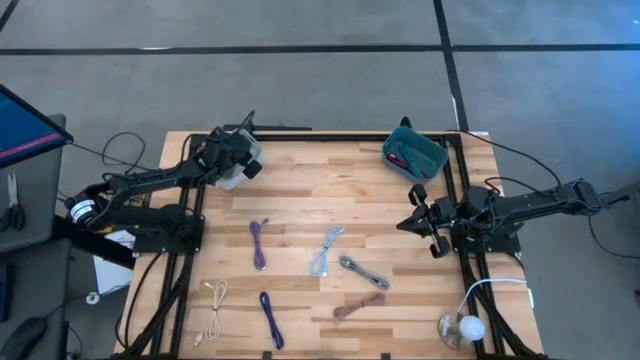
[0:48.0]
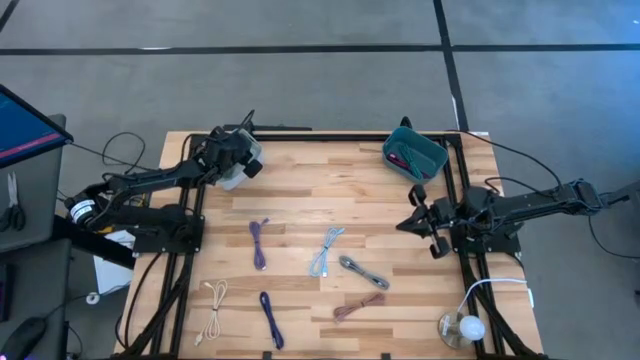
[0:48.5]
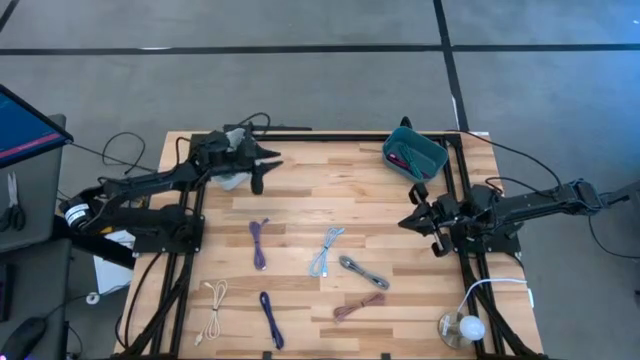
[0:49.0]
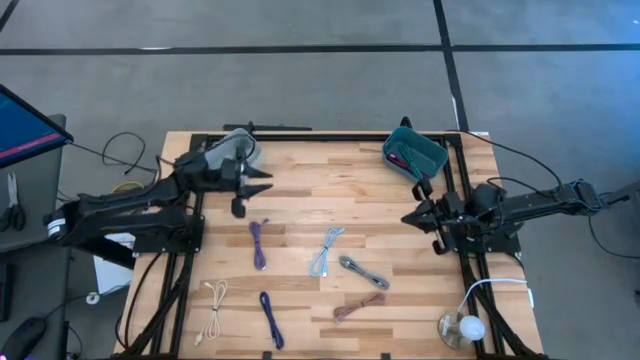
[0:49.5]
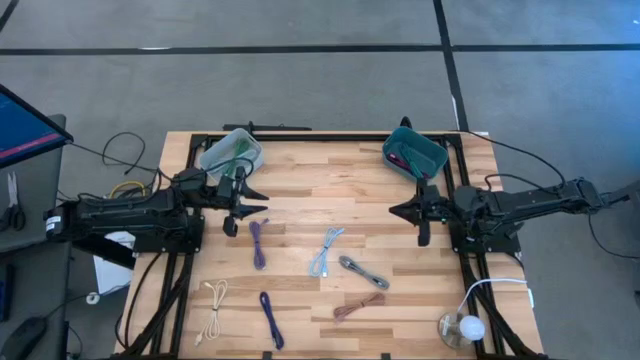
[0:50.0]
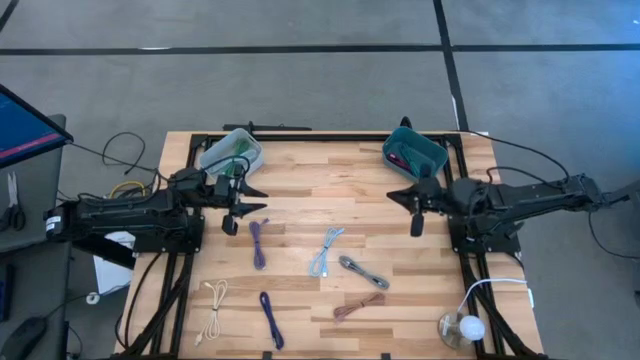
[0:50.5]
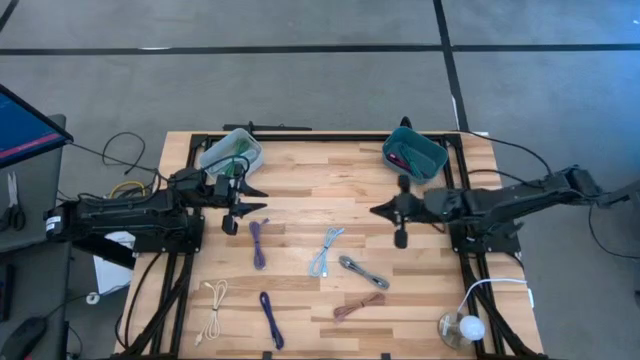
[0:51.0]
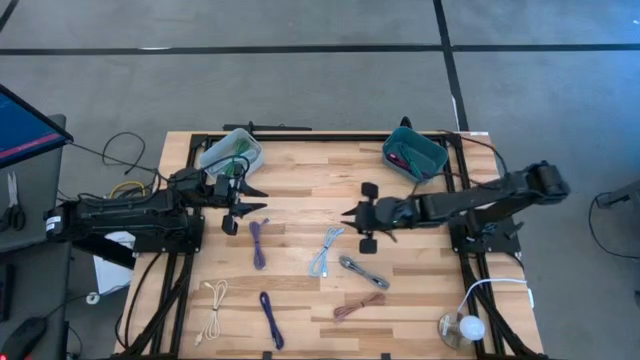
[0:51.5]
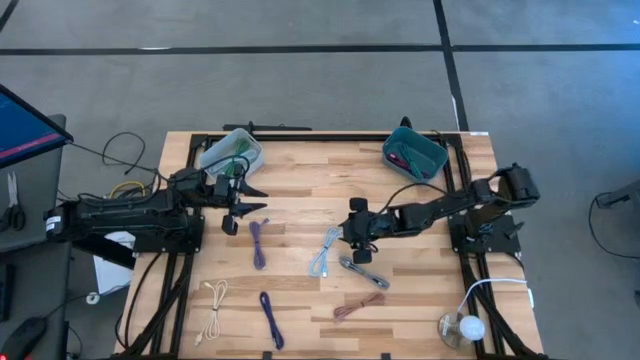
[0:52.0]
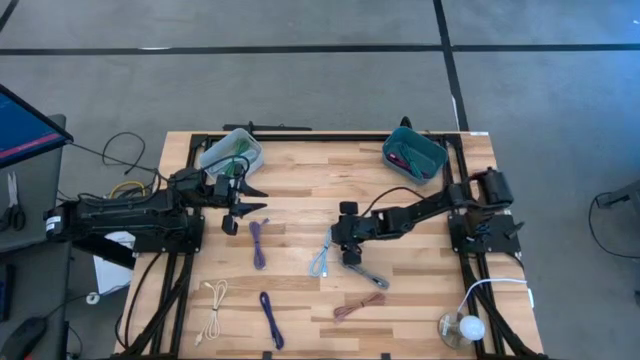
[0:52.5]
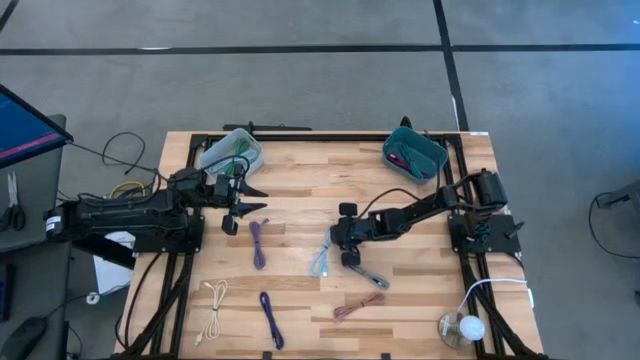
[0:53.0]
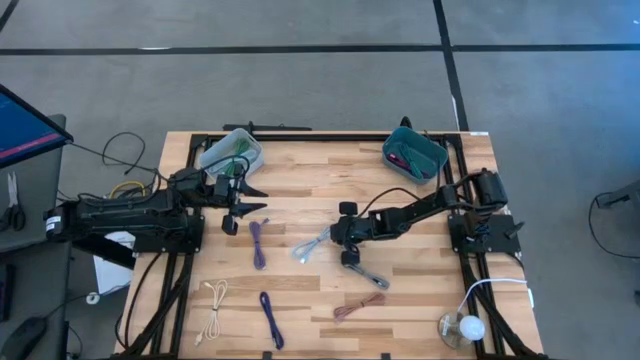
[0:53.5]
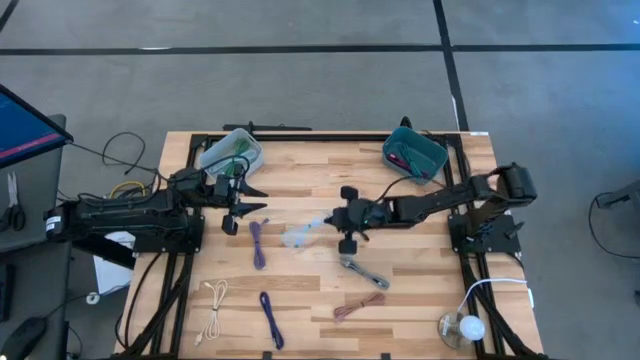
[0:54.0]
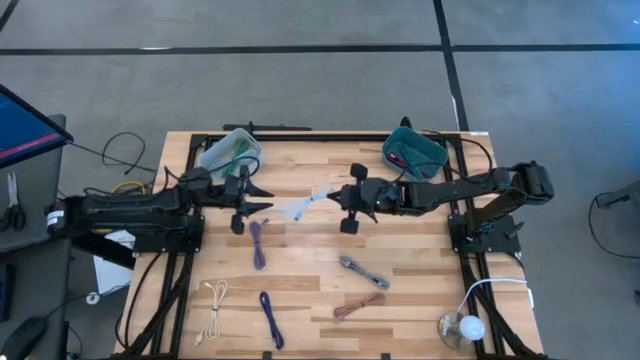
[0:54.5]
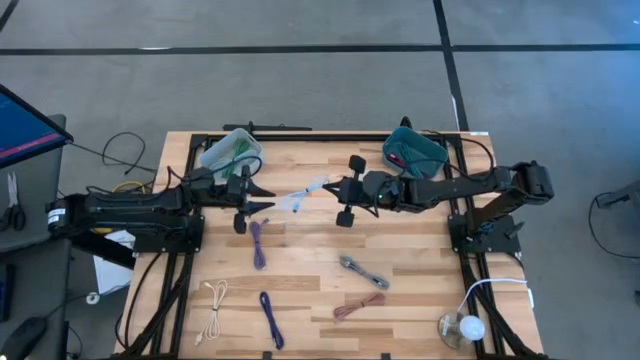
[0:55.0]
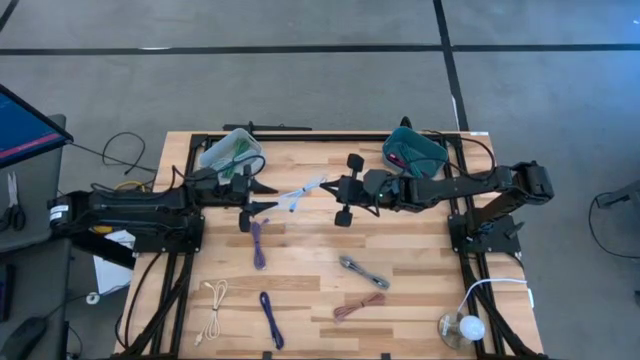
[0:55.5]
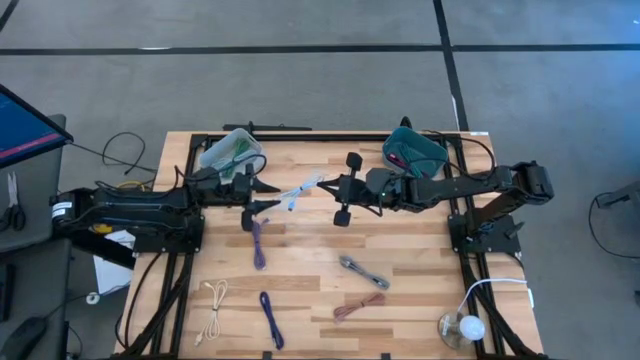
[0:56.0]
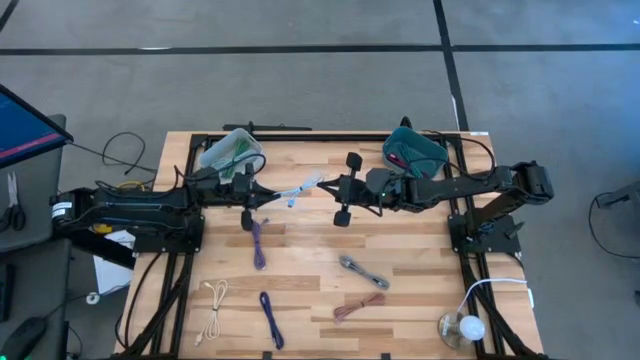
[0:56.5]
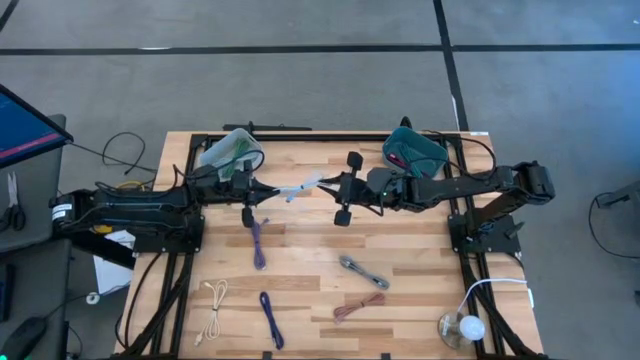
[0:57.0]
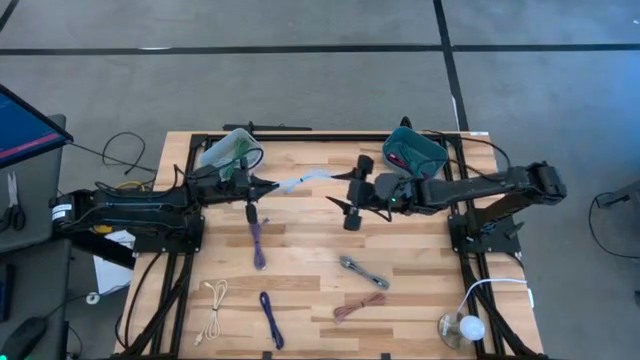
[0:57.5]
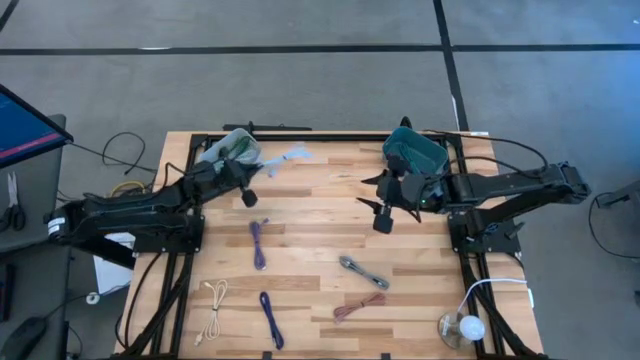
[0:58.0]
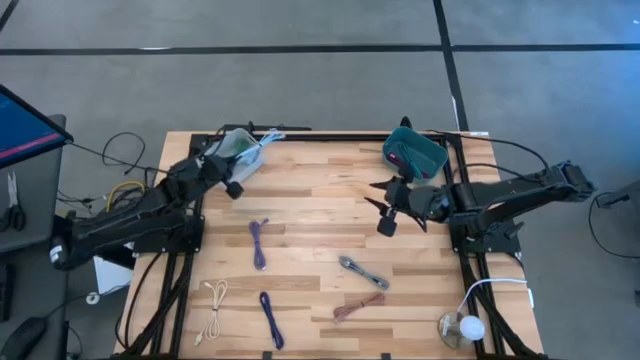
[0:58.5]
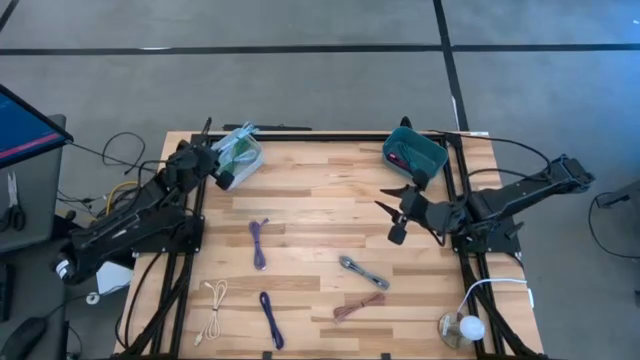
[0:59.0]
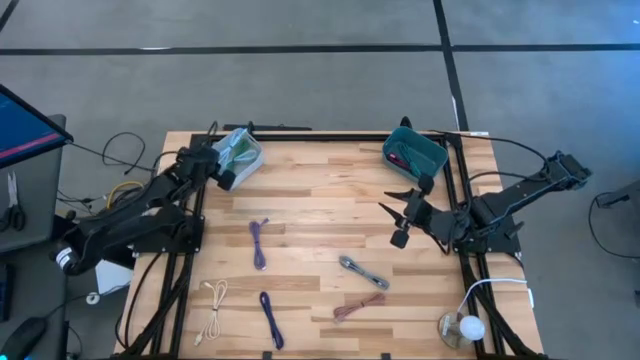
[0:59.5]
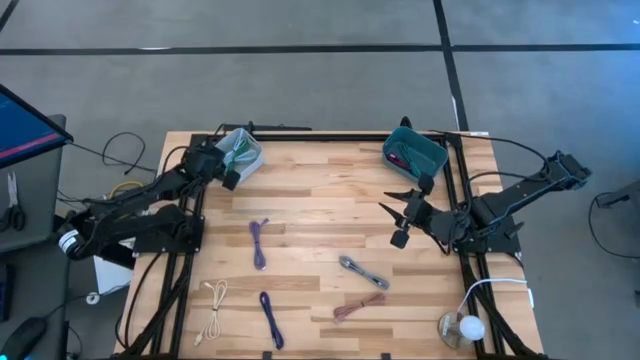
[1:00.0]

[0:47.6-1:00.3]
Task: Pick & Place USB Port
Put the blue charger cable into the white bin

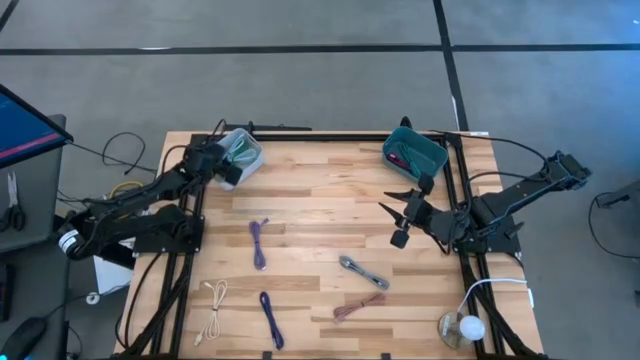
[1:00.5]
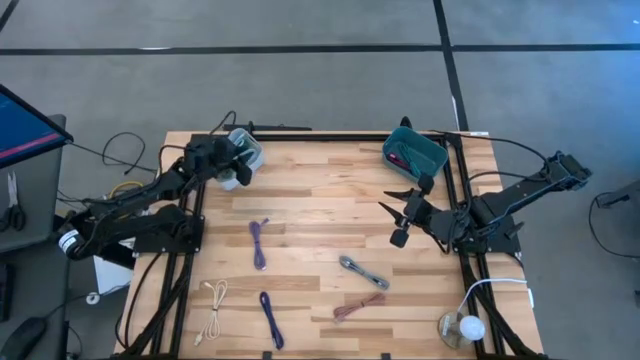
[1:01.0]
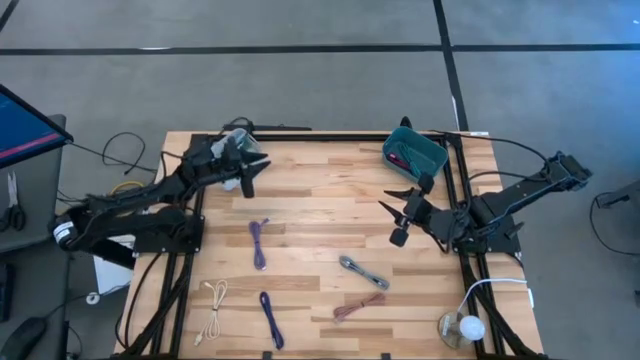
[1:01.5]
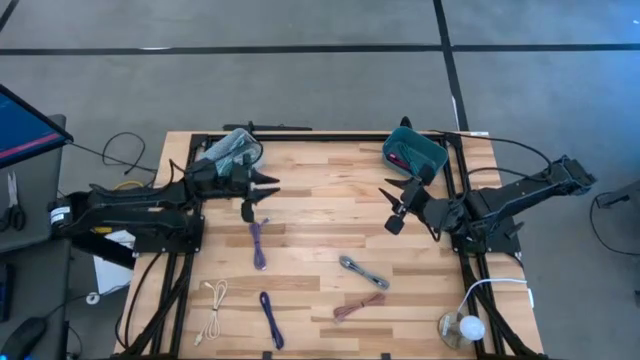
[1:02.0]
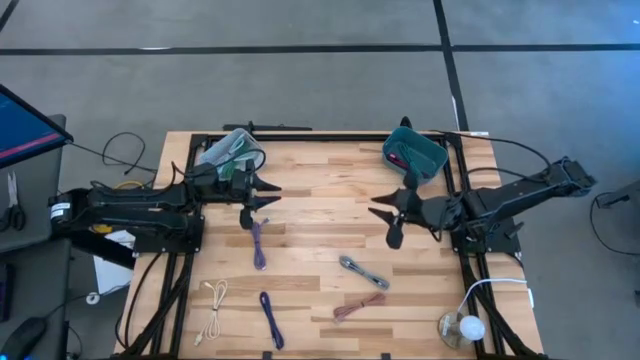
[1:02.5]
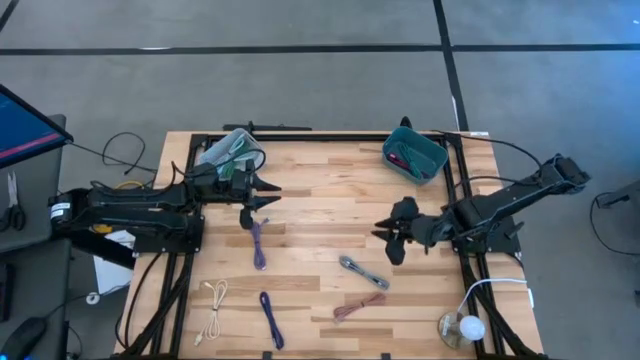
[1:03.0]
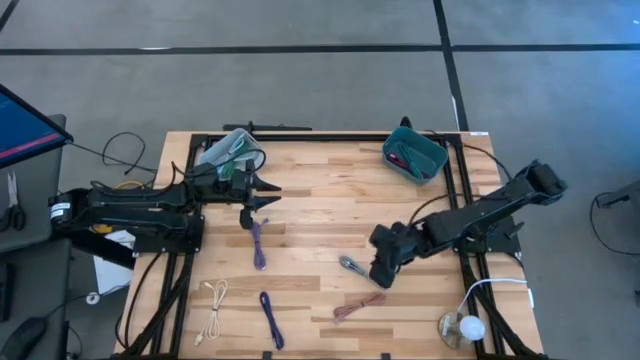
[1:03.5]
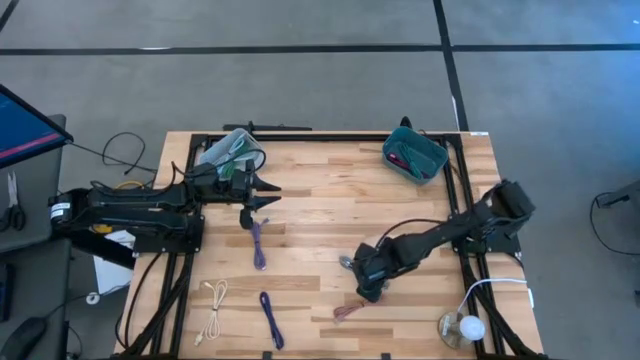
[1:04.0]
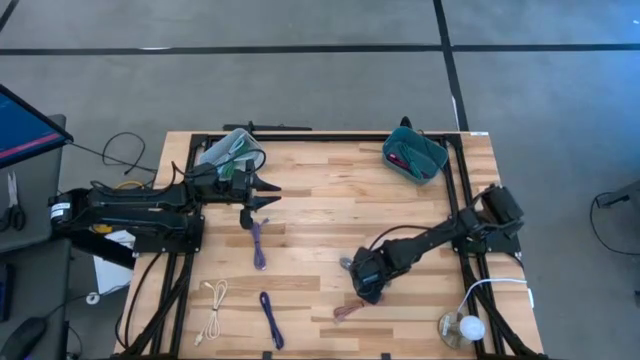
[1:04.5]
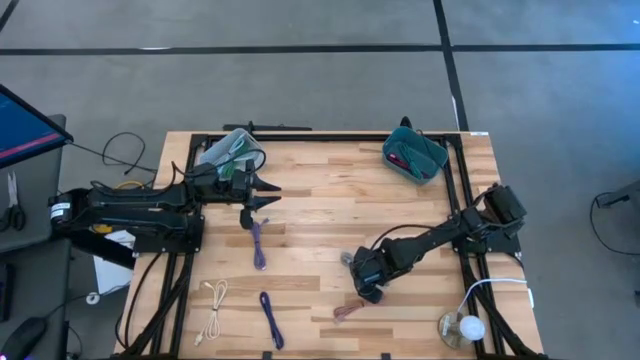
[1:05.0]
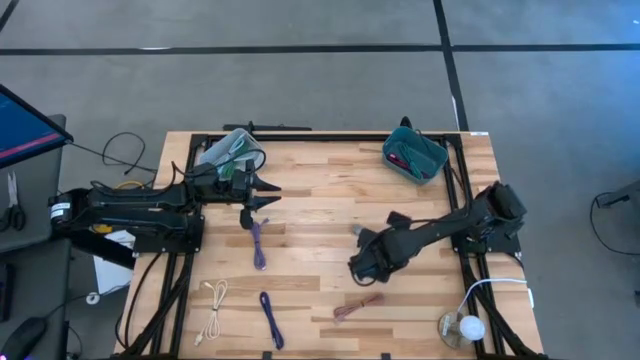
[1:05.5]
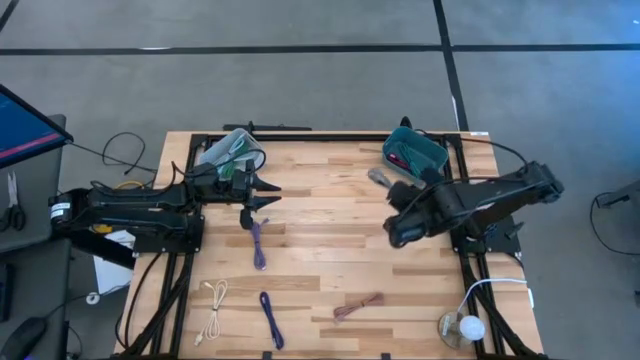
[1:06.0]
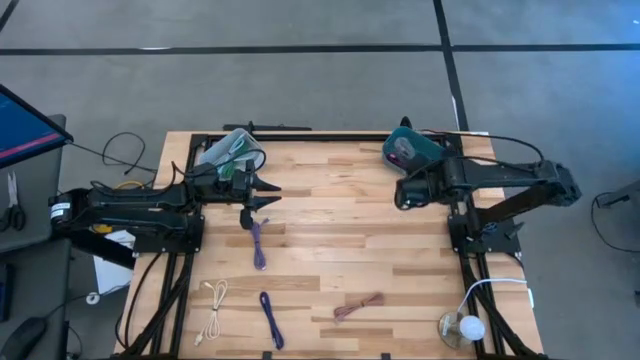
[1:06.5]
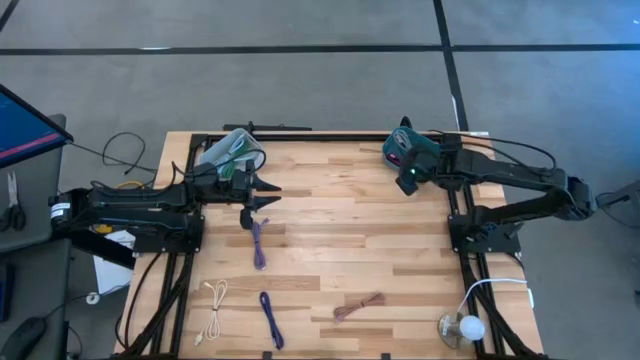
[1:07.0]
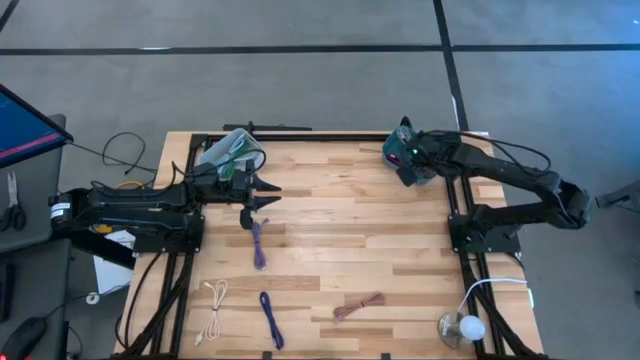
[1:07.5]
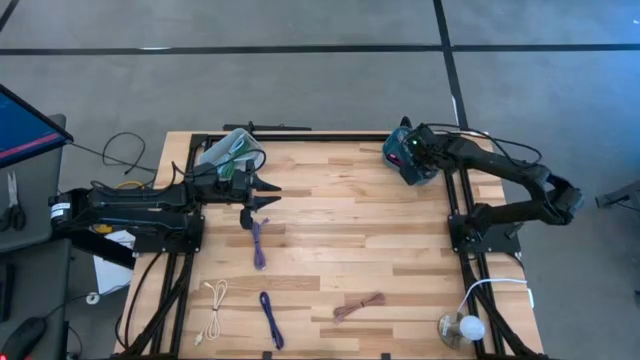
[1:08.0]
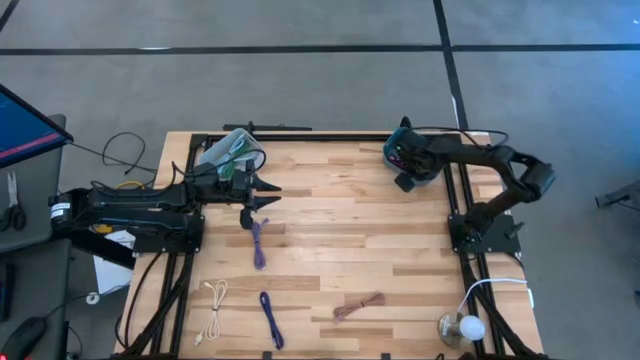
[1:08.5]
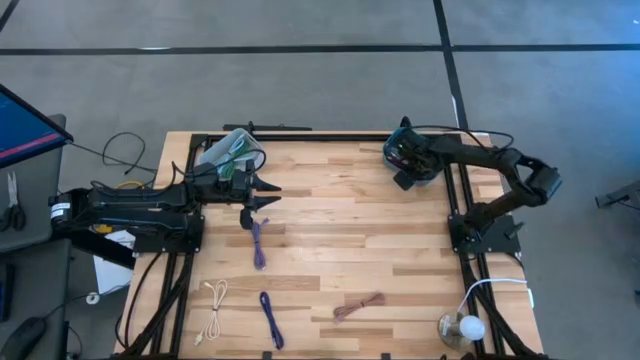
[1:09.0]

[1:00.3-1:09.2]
Put the white black charger cable into the green bin
